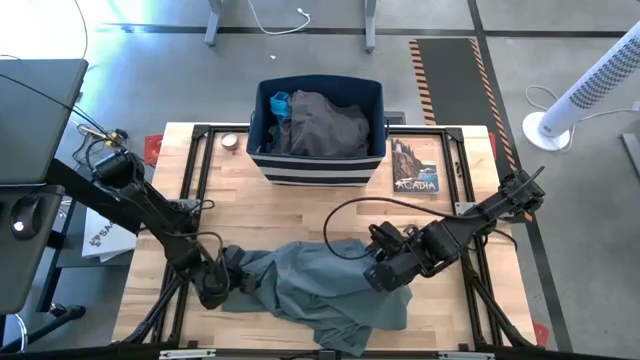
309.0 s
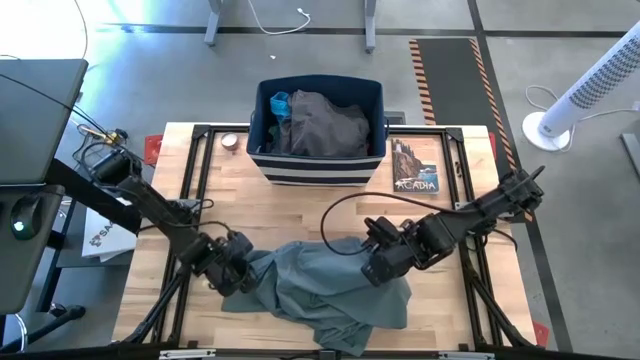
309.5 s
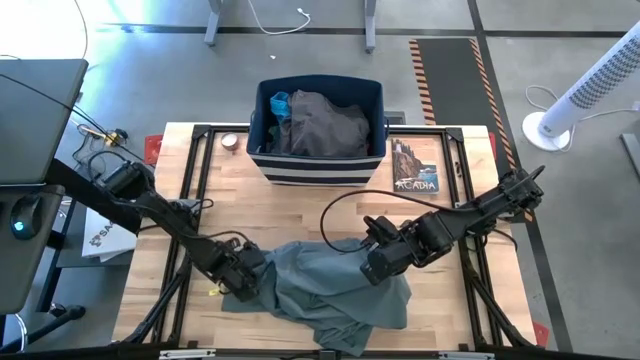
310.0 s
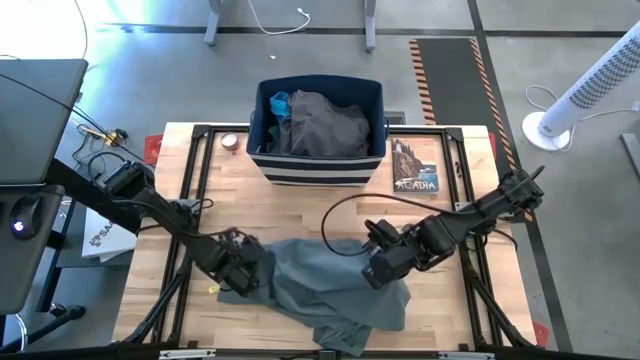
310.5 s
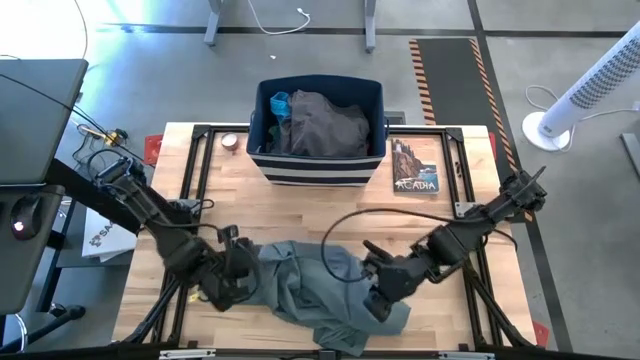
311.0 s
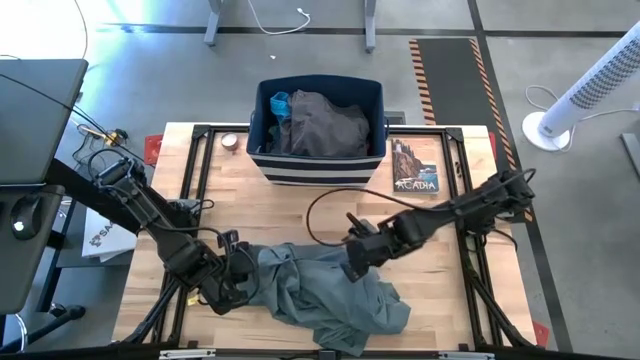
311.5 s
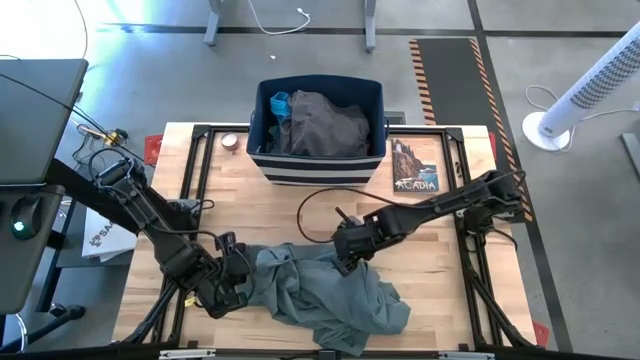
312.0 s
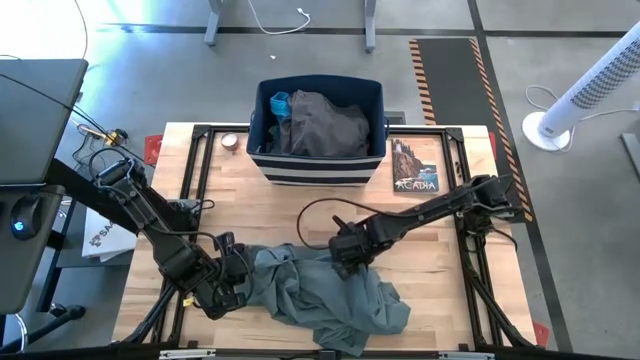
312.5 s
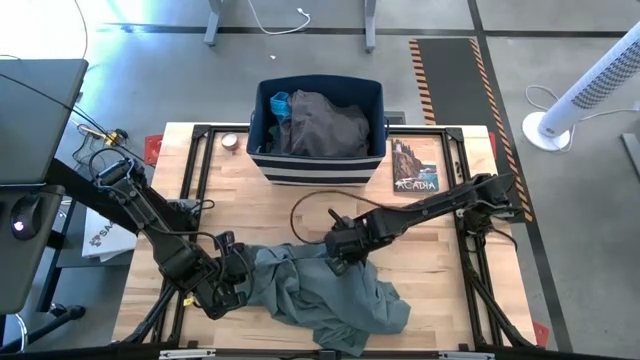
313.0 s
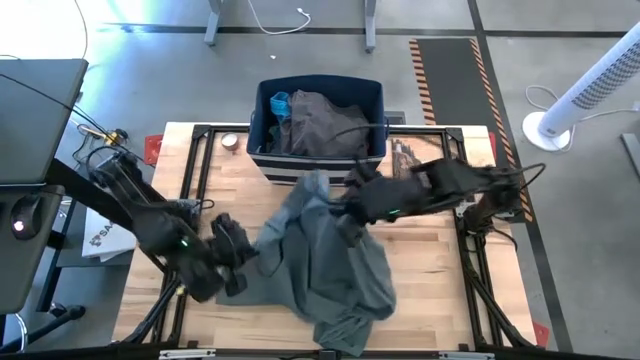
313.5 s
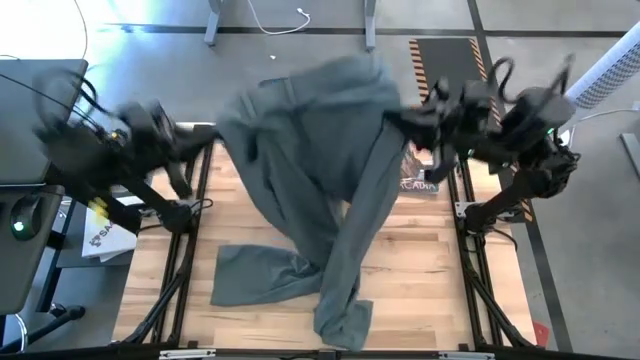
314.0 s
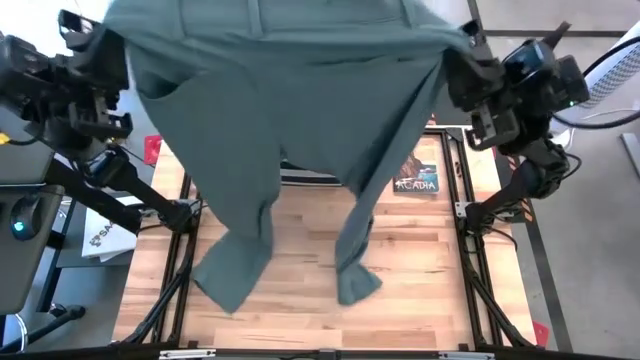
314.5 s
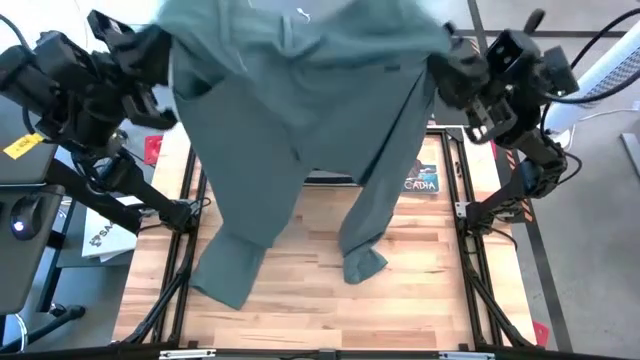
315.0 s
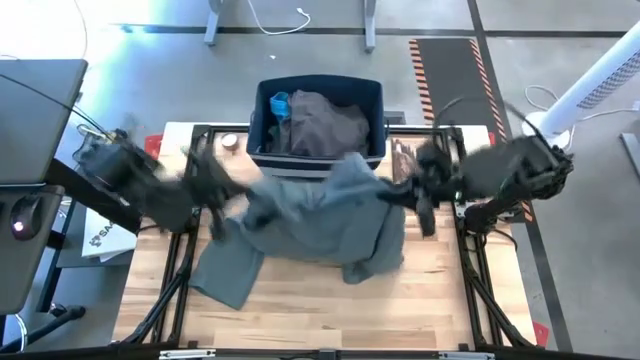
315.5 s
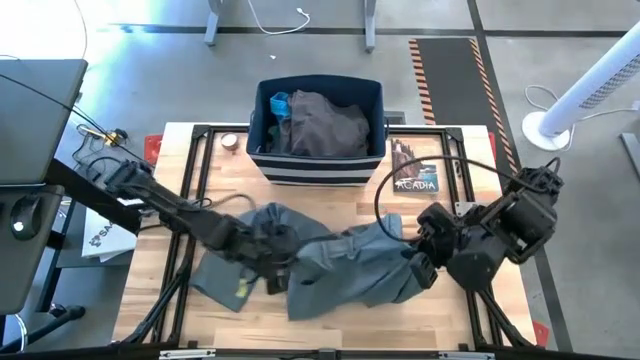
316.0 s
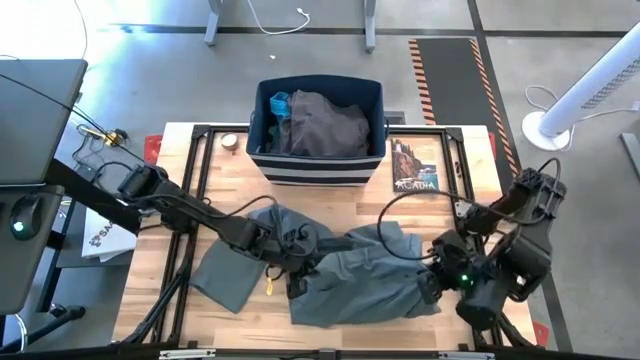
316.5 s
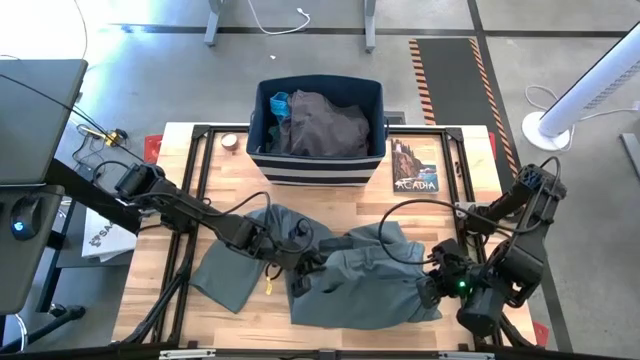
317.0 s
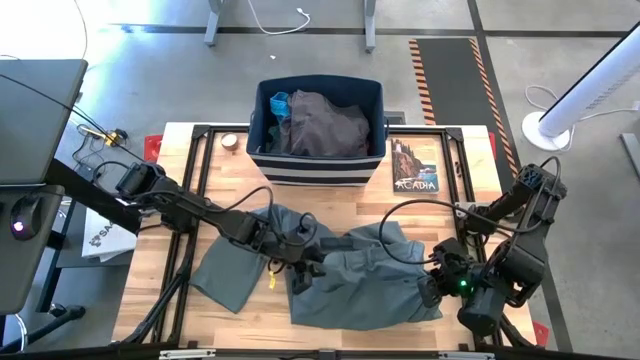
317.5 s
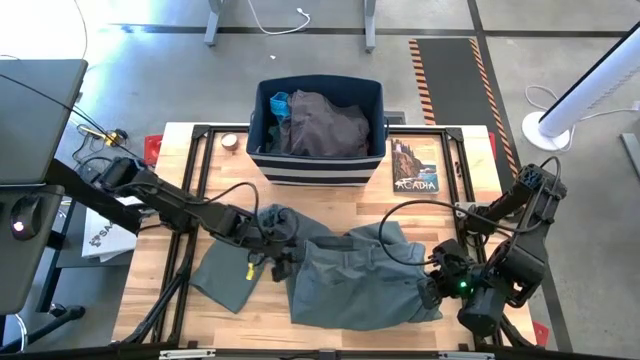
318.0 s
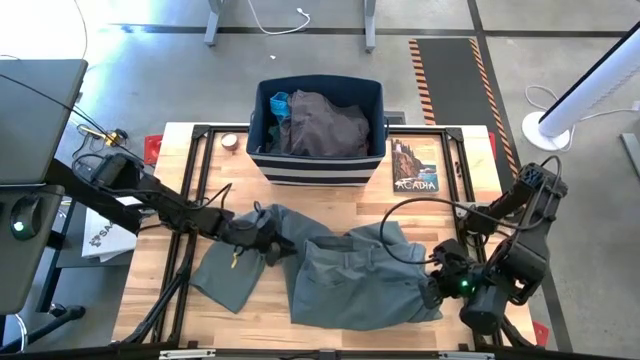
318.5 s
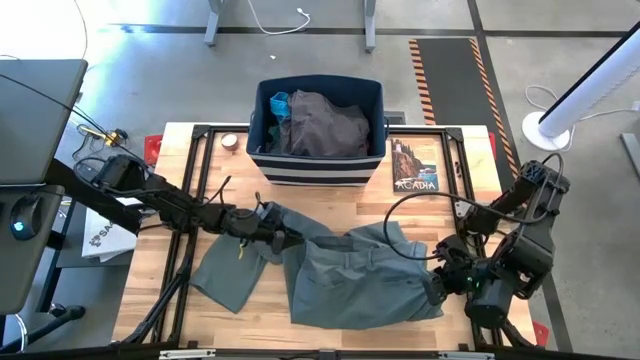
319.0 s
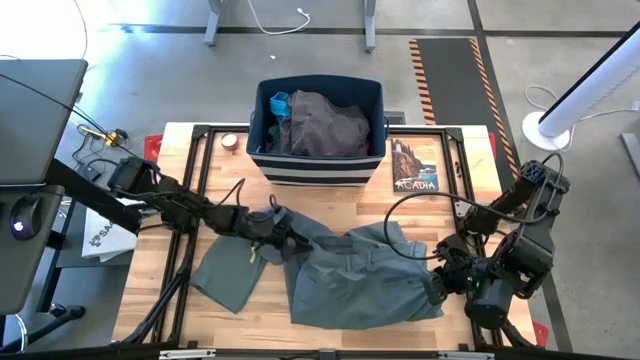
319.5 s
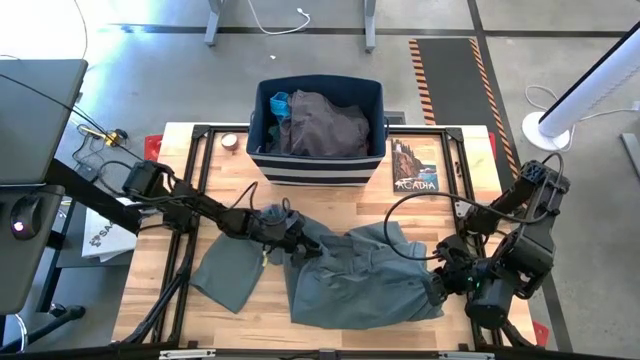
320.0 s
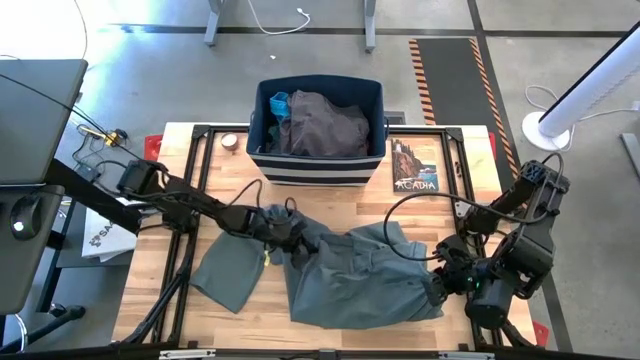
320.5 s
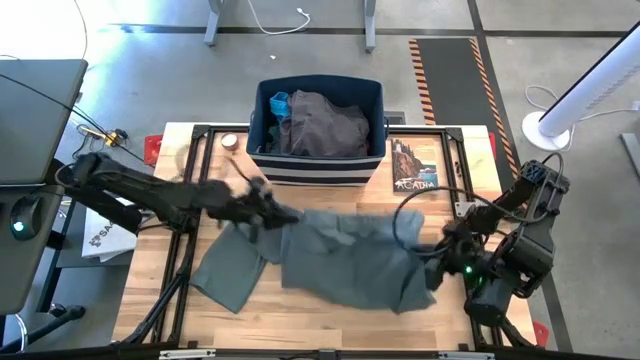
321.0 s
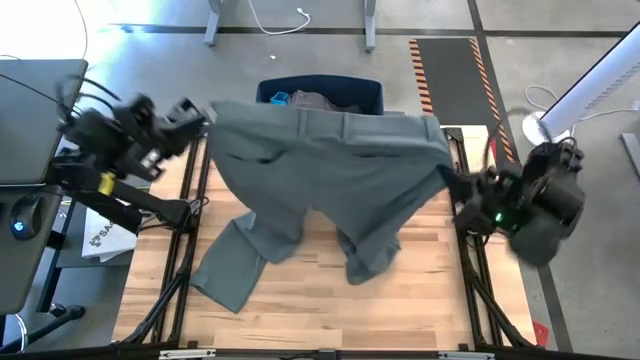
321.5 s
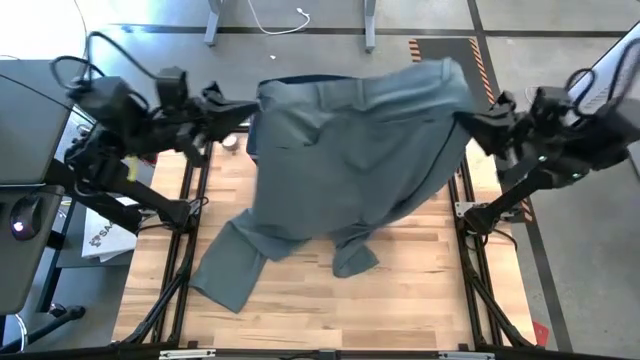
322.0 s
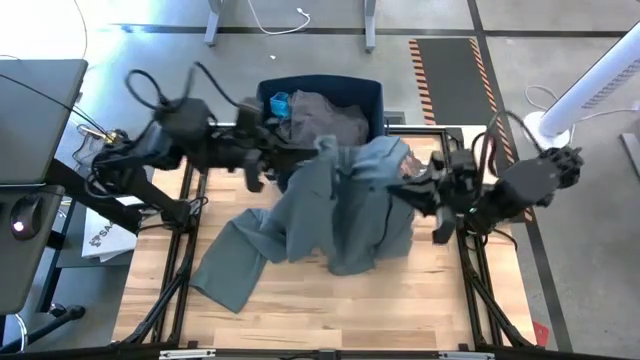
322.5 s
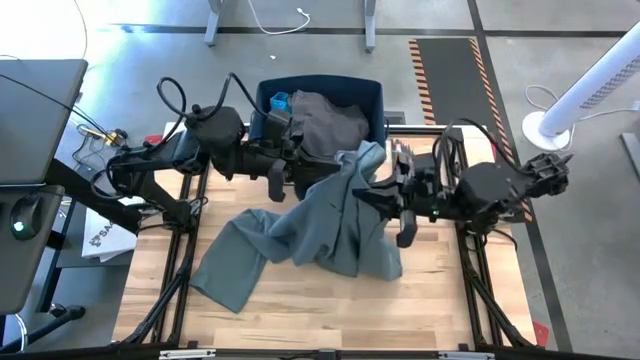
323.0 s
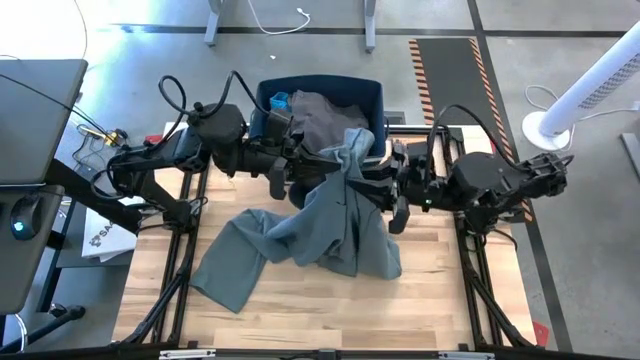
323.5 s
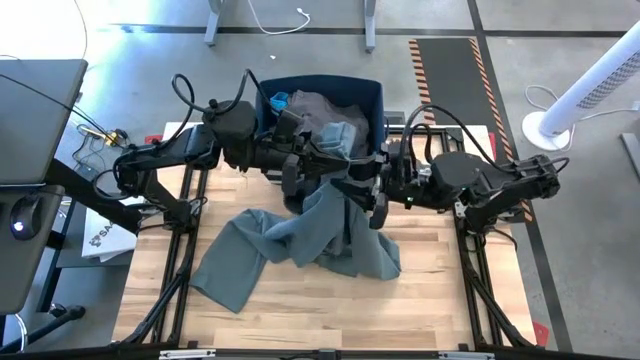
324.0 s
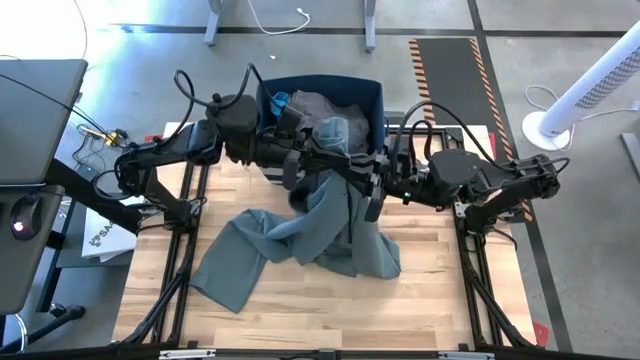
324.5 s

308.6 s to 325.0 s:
Task: Sort clothes
Fold the blue pants

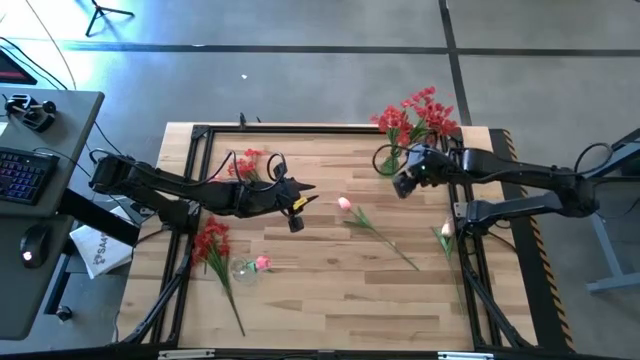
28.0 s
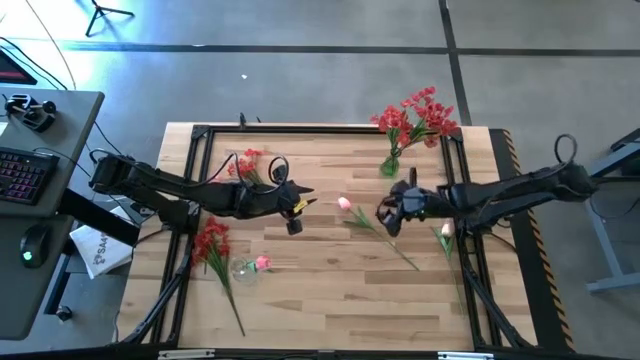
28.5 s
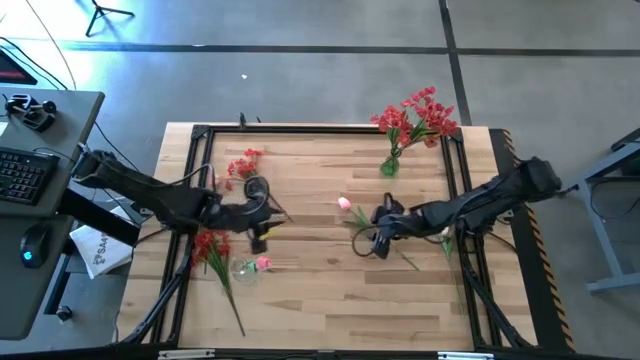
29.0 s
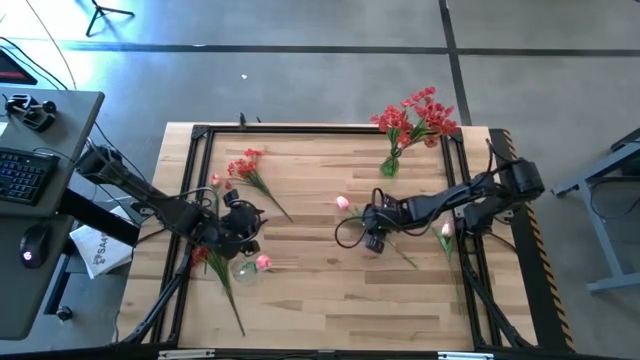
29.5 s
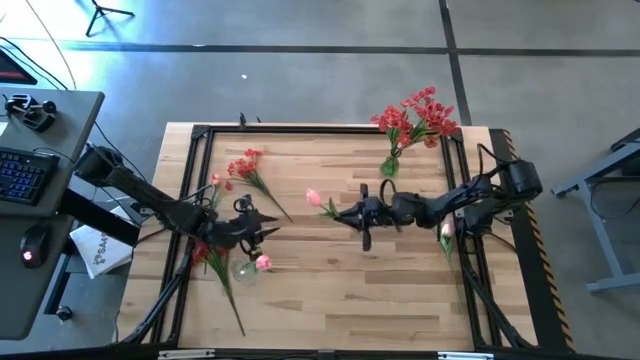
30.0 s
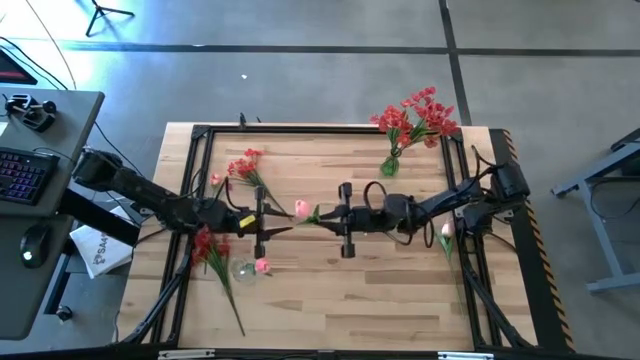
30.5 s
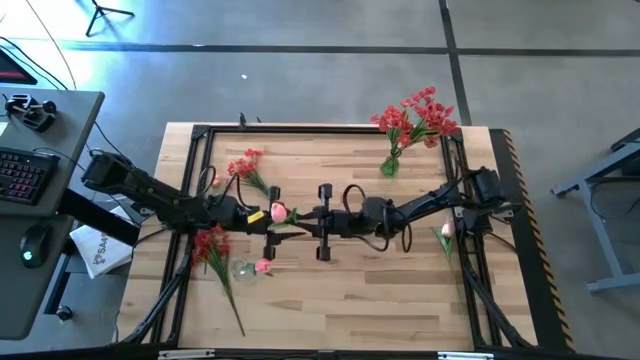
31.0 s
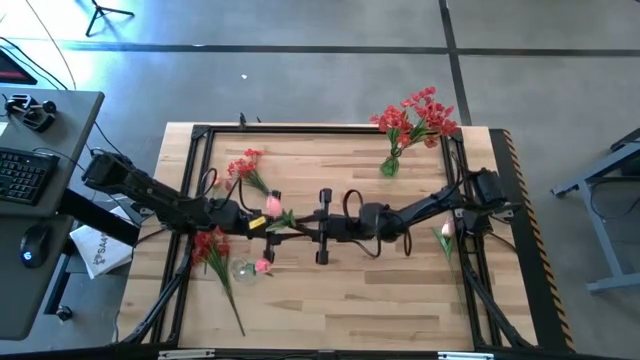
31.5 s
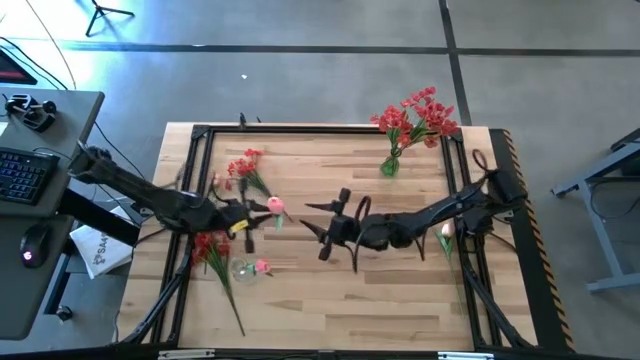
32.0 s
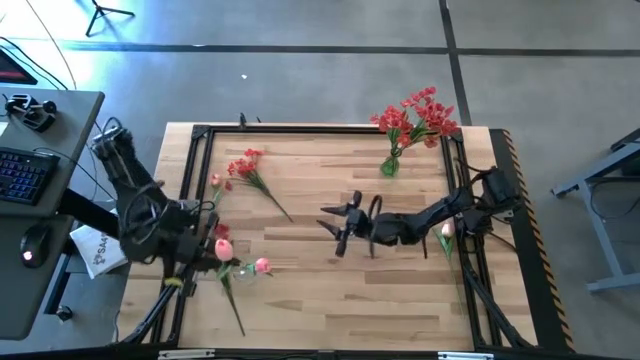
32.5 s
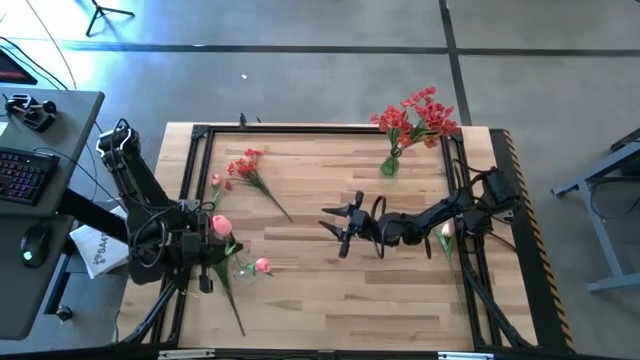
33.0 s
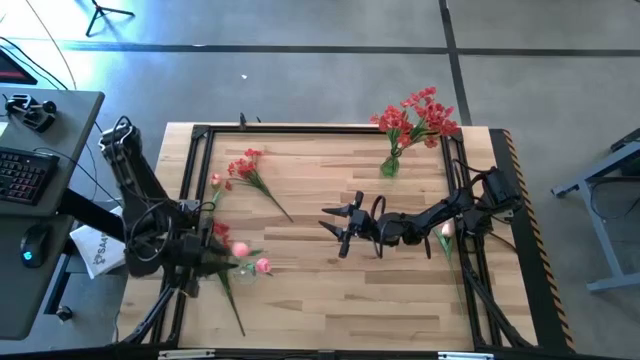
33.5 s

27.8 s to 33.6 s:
Task: Sort flowers into vase by color
Put the pink flower into the transparent vase
